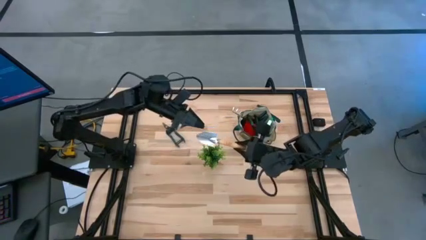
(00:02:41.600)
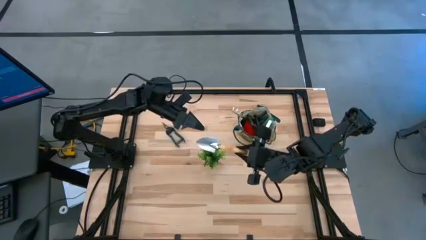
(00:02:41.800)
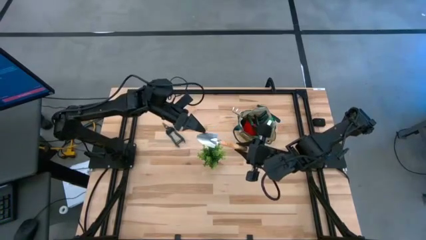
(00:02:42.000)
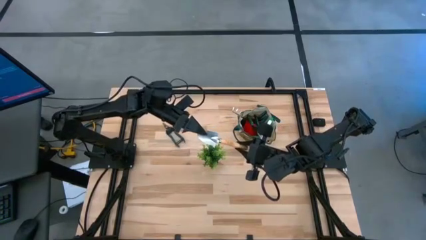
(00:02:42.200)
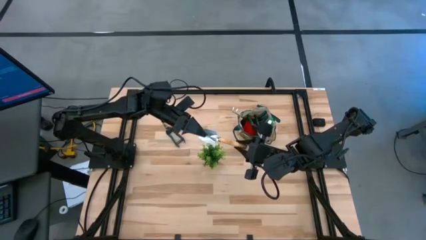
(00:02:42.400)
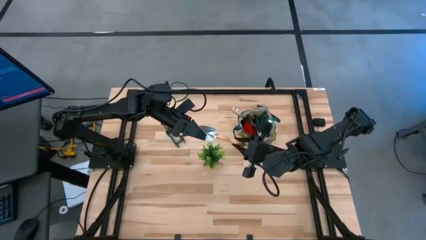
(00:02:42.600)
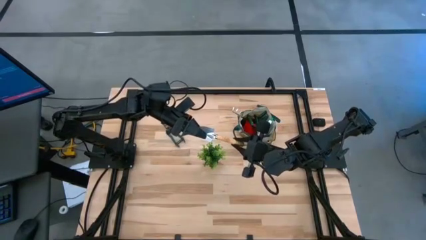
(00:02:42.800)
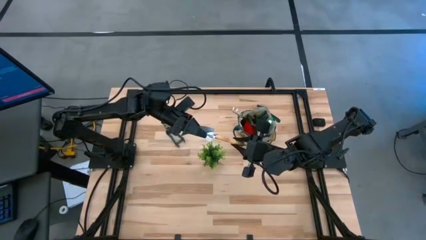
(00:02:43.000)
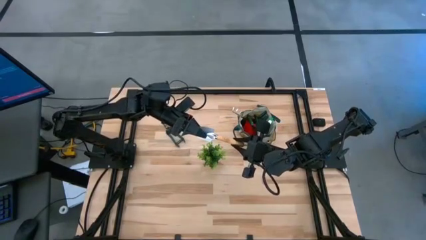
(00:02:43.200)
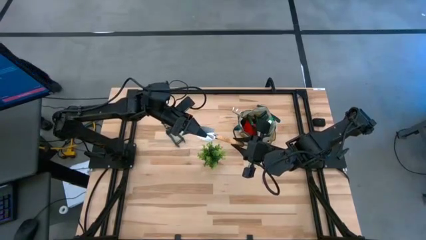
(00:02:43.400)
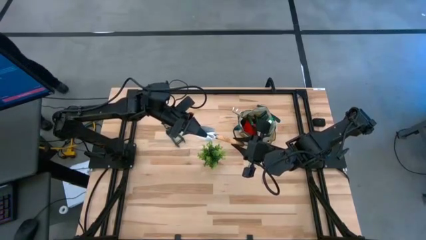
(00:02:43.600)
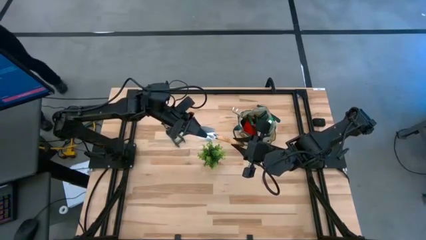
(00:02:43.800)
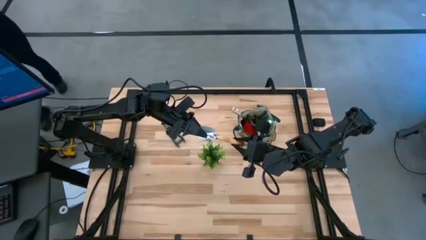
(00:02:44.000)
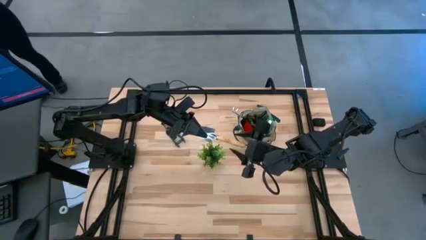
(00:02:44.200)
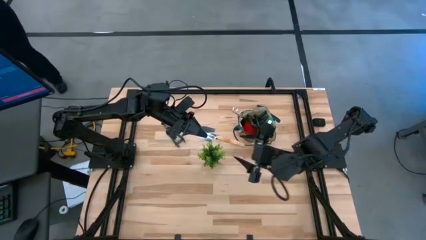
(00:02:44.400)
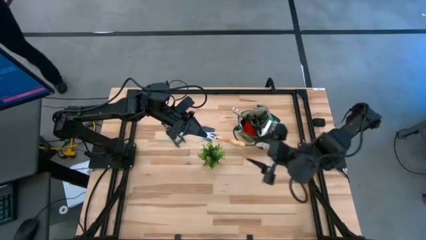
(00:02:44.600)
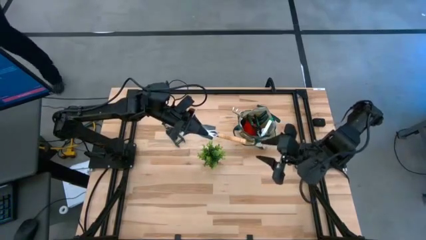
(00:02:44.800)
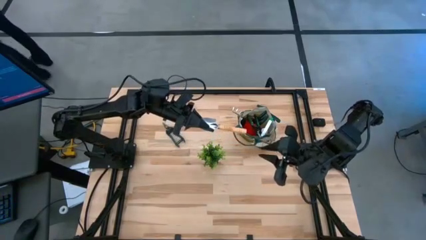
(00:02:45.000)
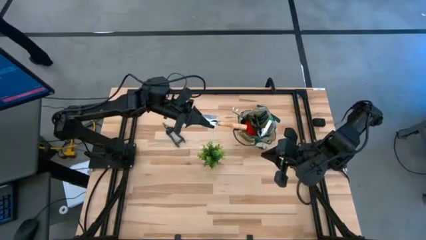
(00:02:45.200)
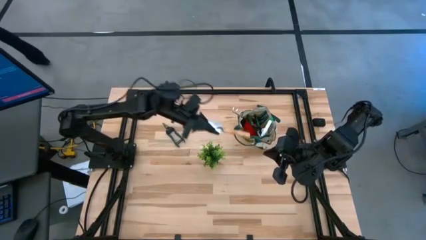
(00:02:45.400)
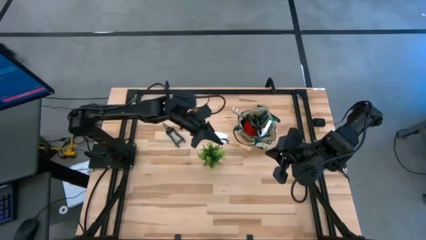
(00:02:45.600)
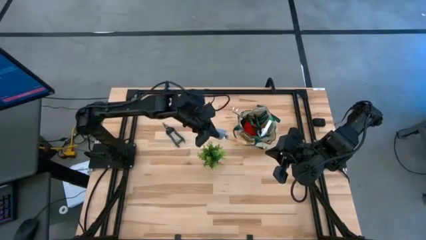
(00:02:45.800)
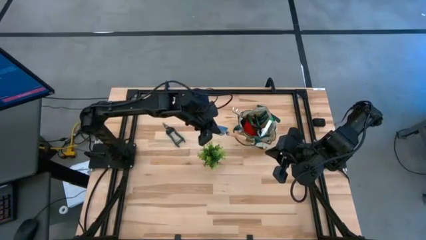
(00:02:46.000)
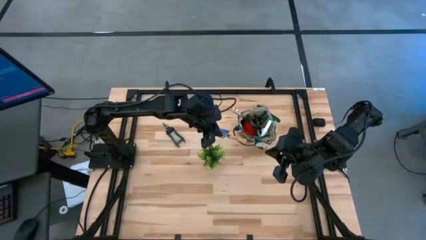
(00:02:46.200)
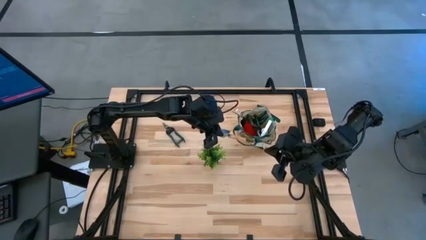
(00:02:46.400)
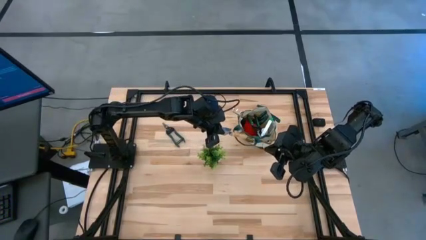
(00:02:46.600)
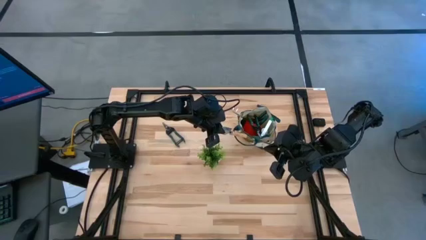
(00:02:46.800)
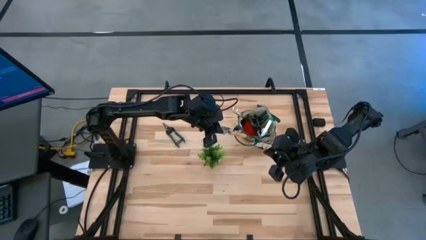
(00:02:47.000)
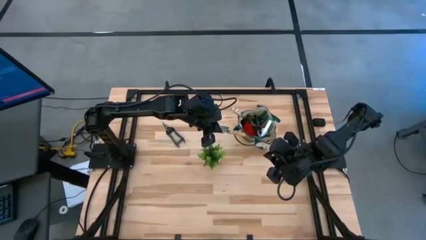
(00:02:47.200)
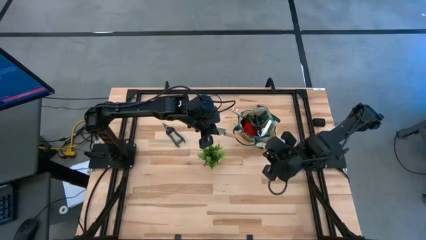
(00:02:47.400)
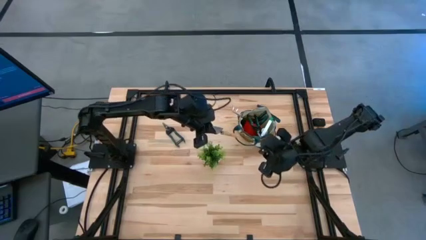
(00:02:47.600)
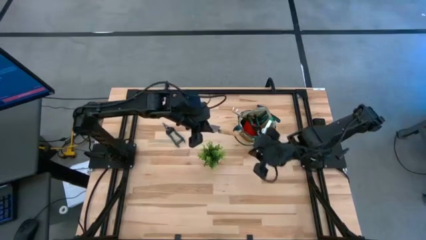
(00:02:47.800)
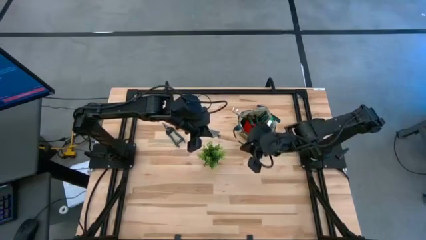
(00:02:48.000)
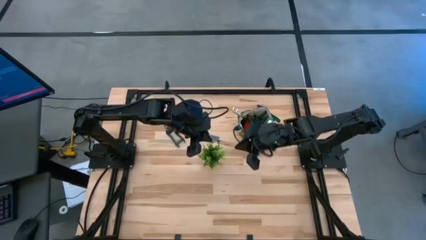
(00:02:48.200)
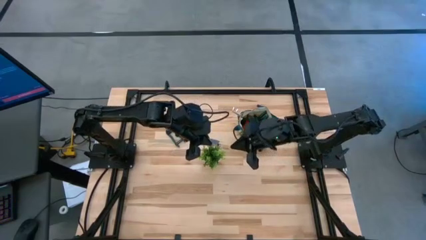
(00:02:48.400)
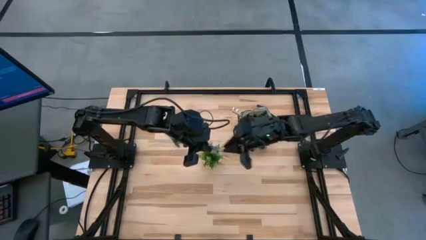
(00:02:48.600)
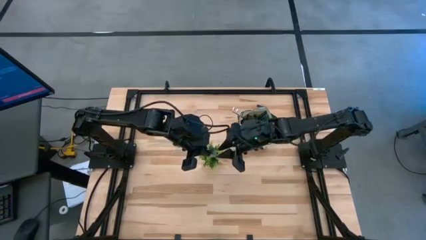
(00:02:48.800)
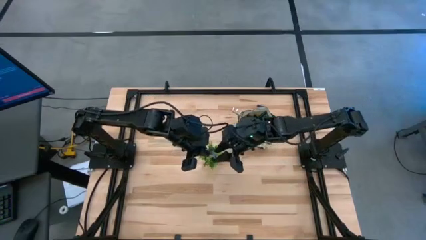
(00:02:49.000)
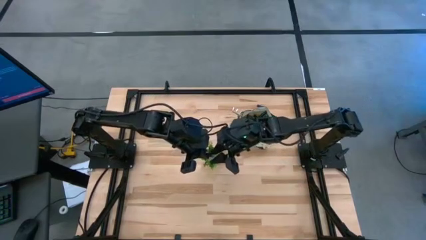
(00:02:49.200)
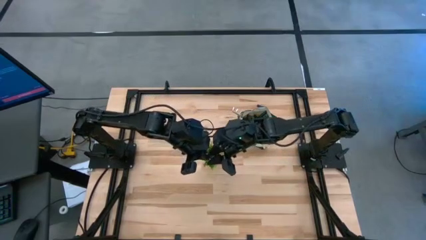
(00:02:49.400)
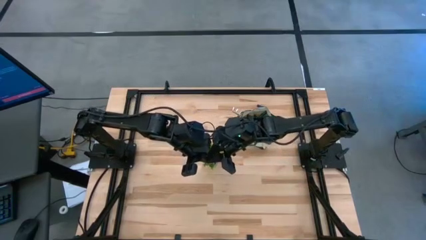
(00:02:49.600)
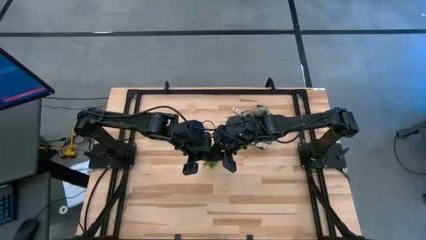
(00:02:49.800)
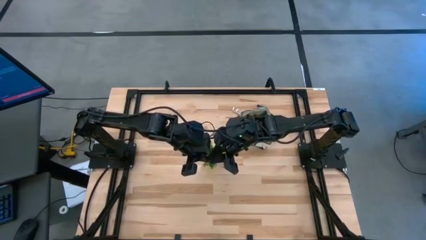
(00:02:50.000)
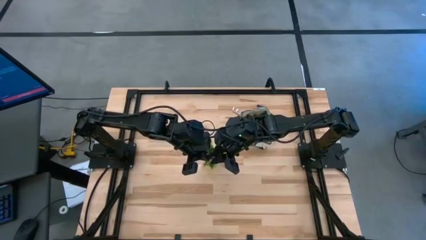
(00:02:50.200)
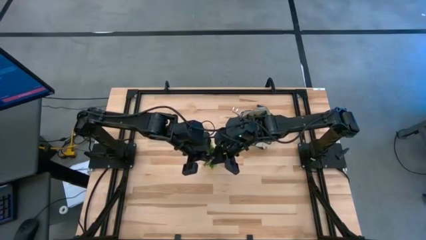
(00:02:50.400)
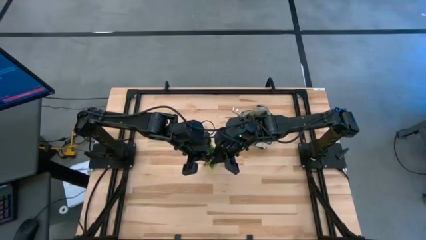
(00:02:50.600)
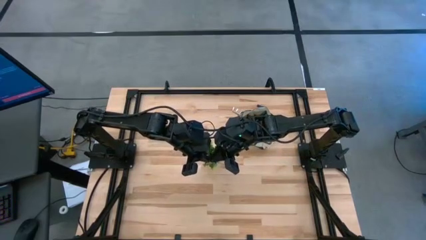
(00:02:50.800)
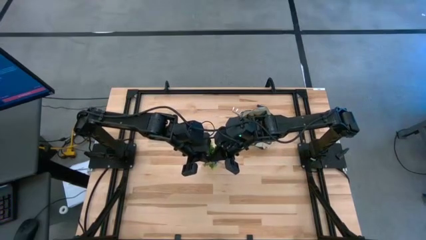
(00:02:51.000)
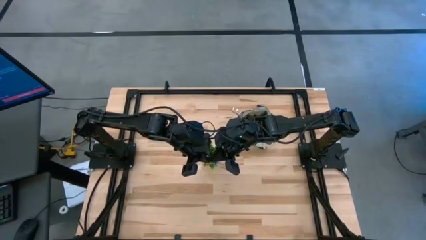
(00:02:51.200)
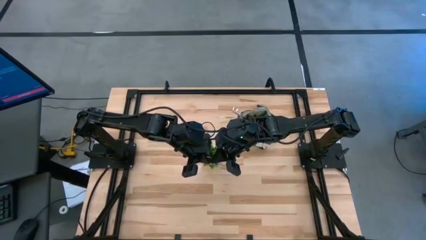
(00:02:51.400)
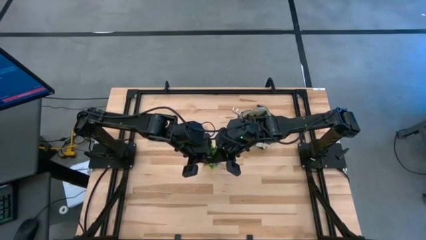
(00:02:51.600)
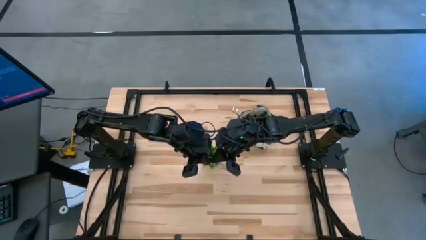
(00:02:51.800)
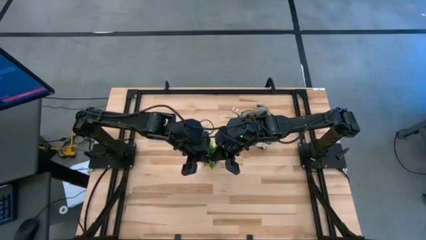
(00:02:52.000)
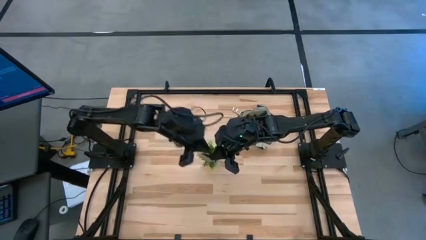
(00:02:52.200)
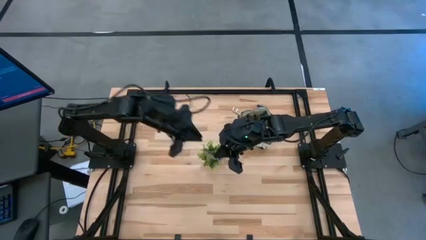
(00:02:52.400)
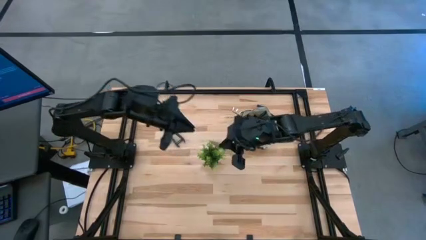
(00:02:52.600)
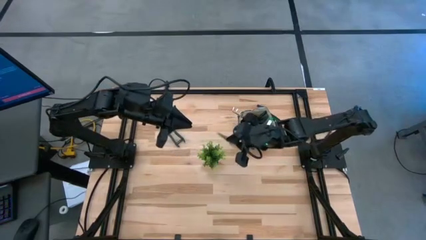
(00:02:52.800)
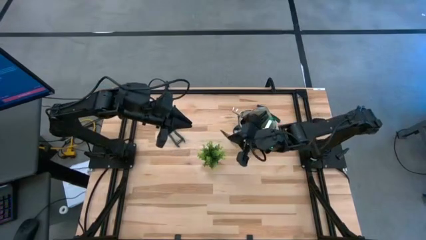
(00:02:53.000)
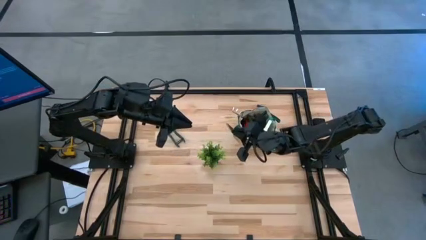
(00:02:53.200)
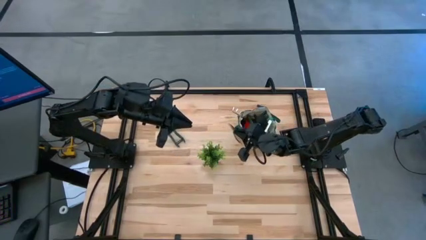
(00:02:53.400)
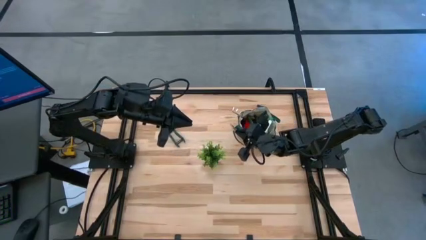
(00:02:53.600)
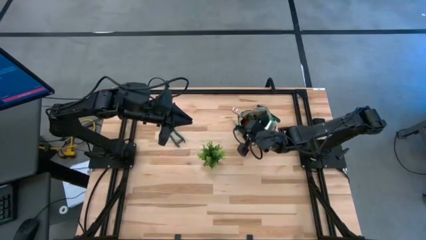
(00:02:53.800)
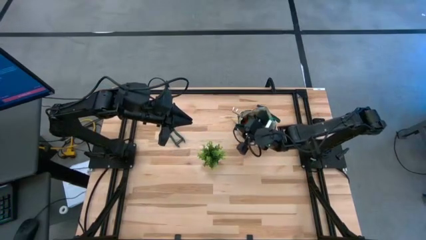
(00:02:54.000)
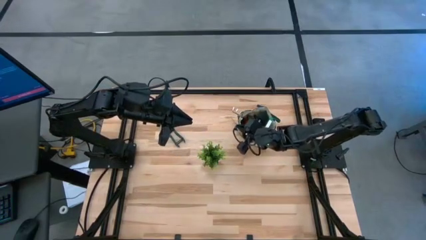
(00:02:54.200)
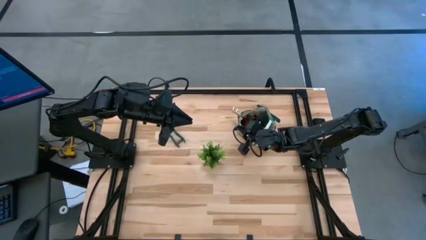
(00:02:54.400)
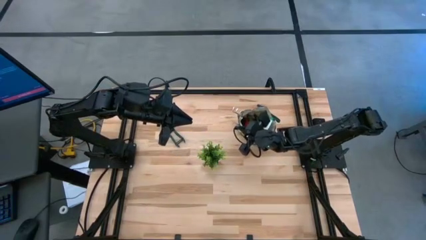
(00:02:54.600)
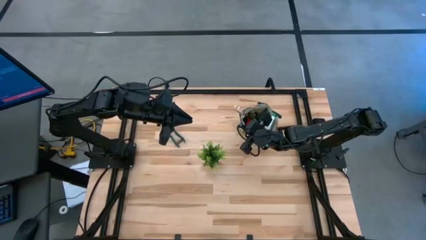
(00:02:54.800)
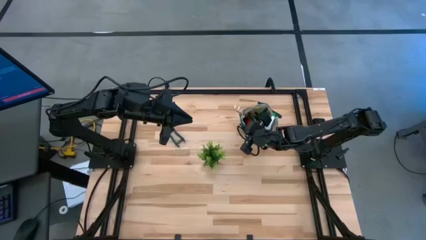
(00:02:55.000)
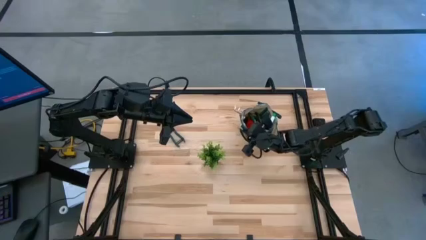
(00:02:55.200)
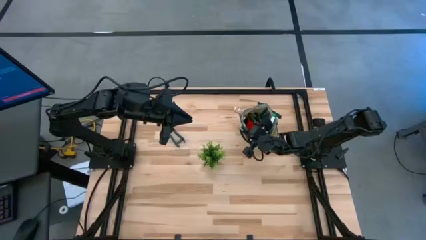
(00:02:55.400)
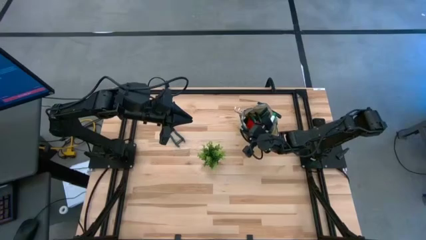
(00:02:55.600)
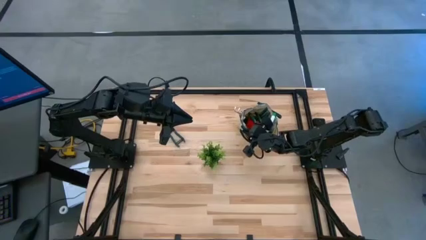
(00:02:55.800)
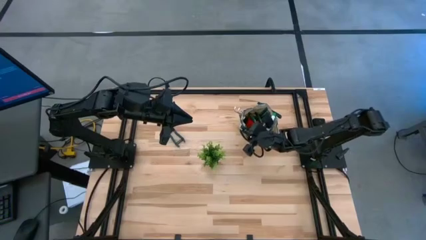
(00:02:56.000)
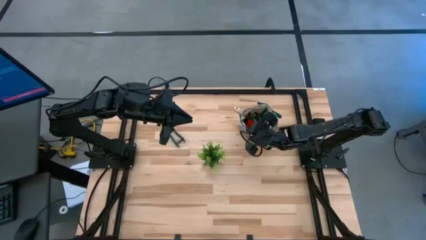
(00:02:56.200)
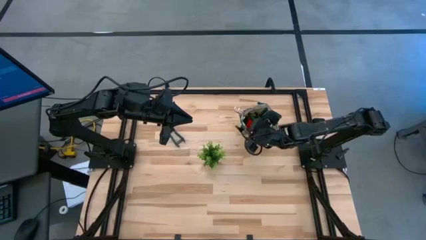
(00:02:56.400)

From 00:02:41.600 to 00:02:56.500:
Task: Pick & Place Garden tools in Gardening bag
Put the brown trowel into the brown gardening bag
